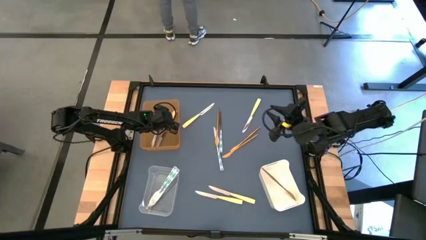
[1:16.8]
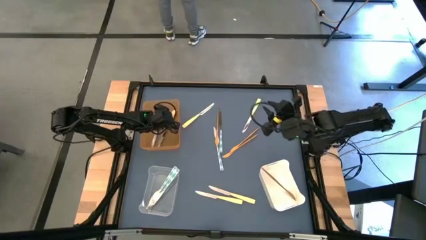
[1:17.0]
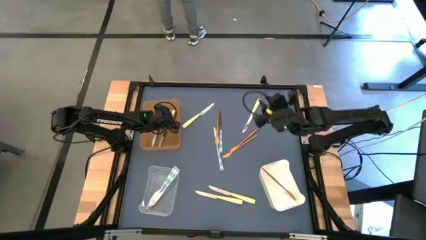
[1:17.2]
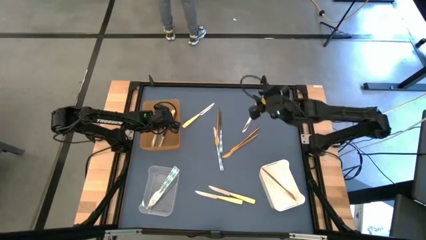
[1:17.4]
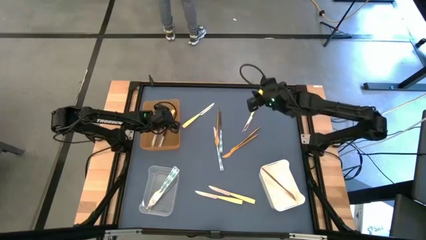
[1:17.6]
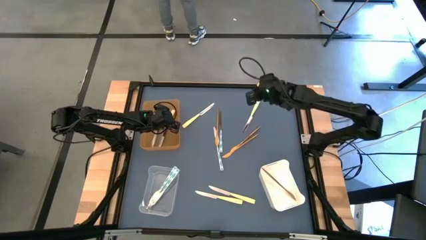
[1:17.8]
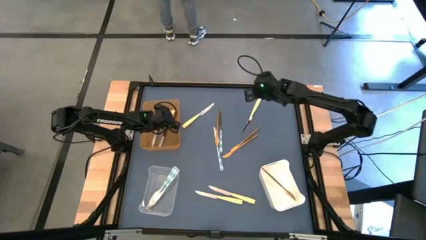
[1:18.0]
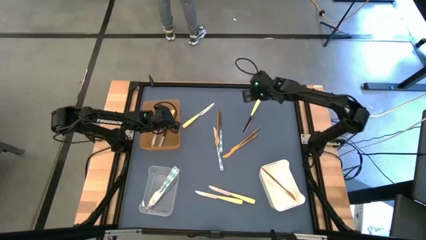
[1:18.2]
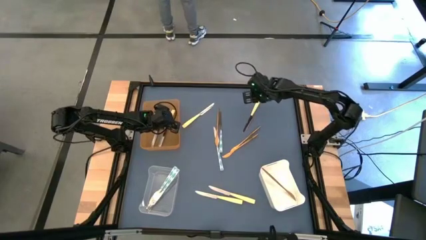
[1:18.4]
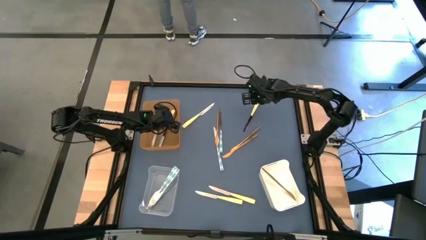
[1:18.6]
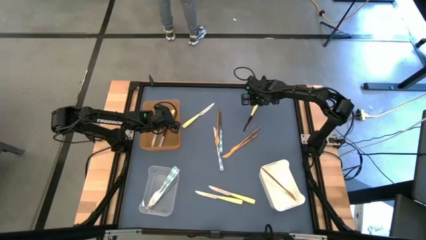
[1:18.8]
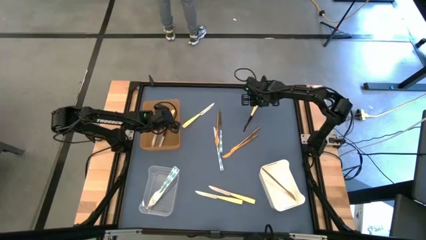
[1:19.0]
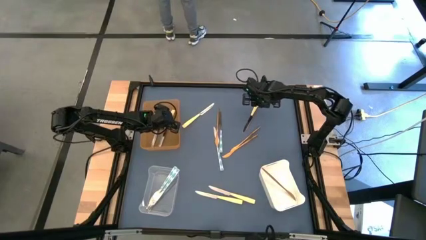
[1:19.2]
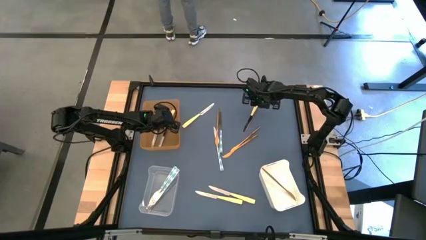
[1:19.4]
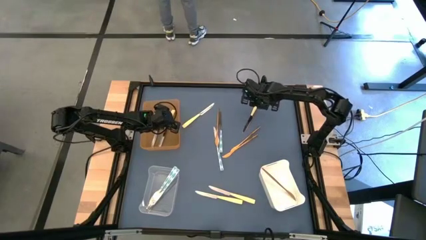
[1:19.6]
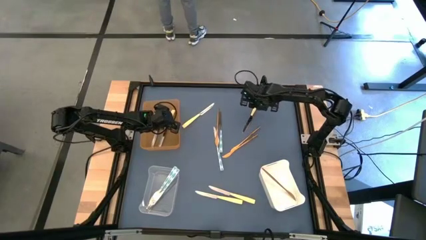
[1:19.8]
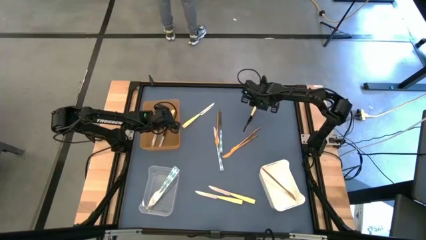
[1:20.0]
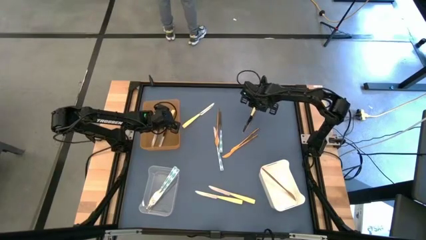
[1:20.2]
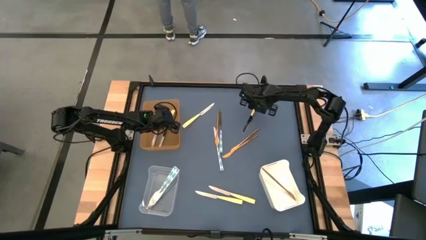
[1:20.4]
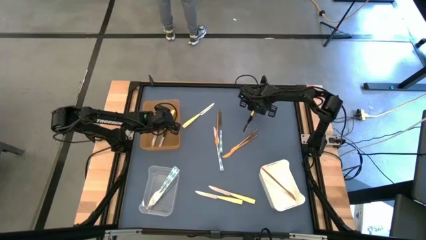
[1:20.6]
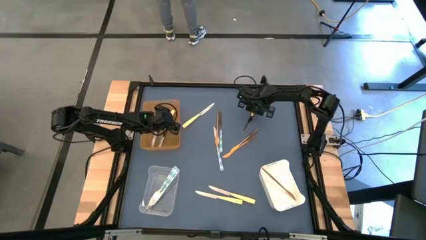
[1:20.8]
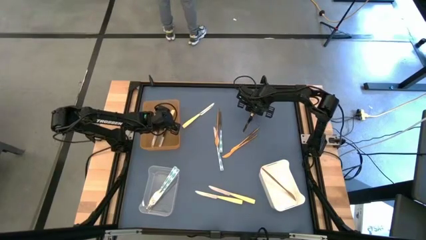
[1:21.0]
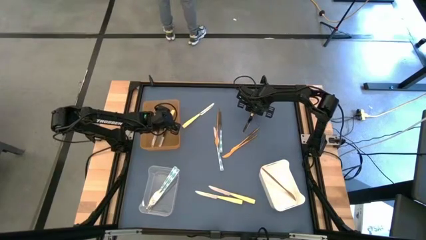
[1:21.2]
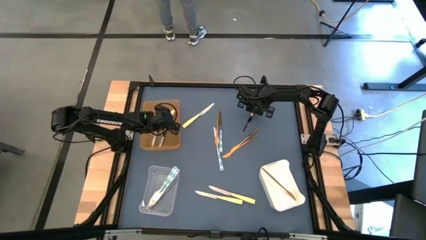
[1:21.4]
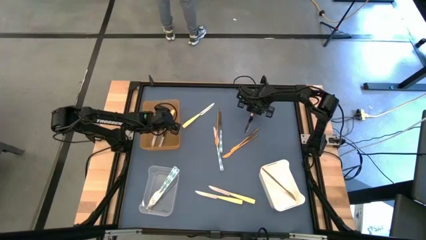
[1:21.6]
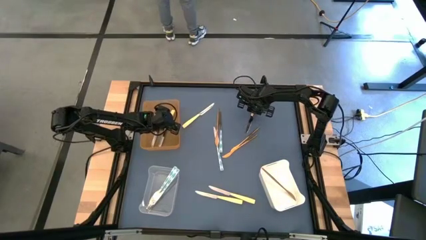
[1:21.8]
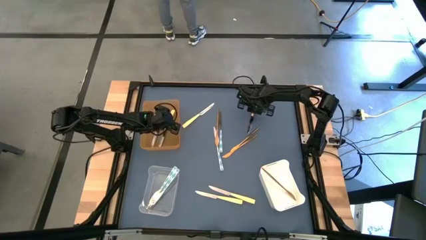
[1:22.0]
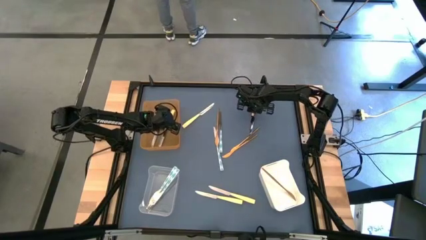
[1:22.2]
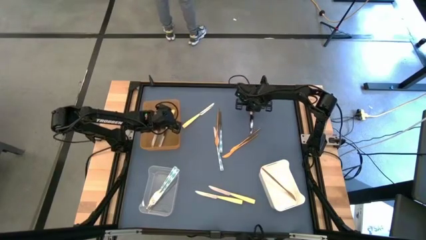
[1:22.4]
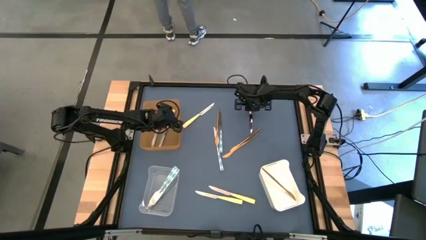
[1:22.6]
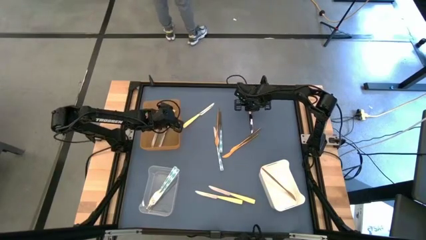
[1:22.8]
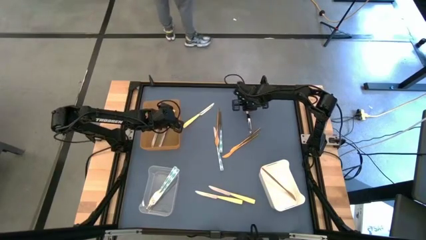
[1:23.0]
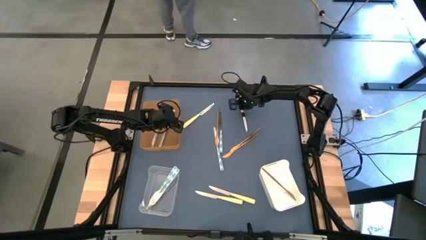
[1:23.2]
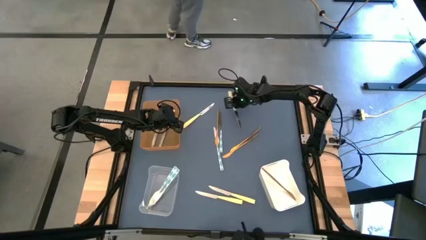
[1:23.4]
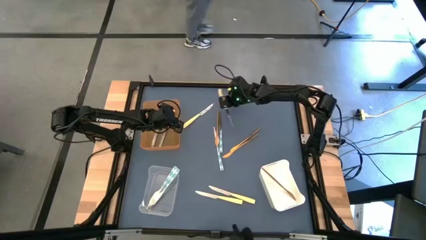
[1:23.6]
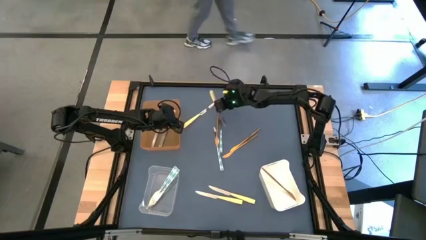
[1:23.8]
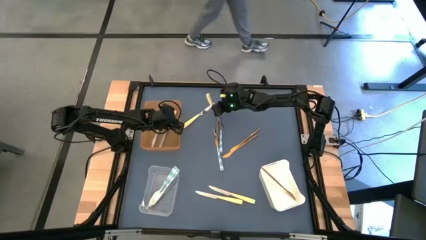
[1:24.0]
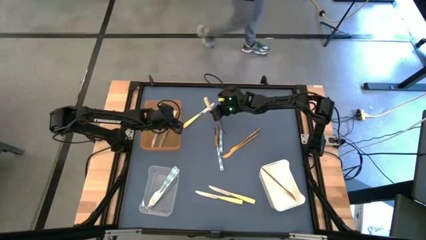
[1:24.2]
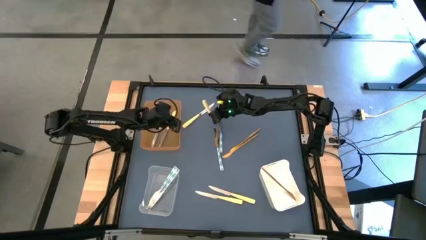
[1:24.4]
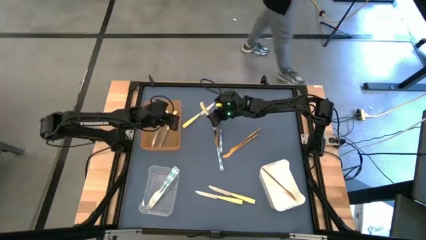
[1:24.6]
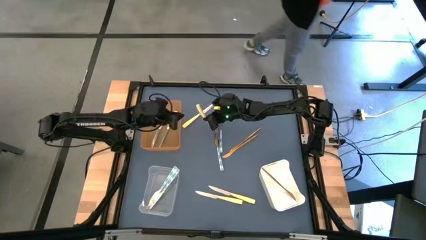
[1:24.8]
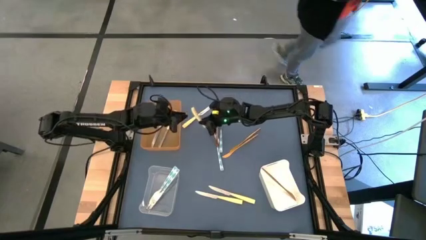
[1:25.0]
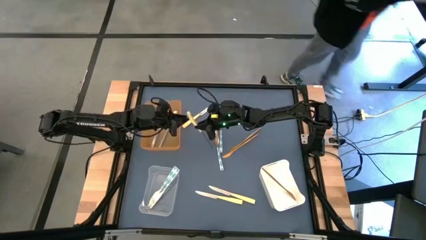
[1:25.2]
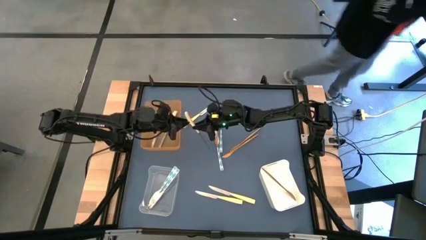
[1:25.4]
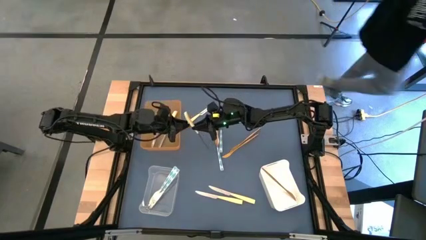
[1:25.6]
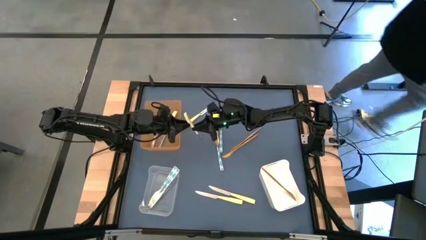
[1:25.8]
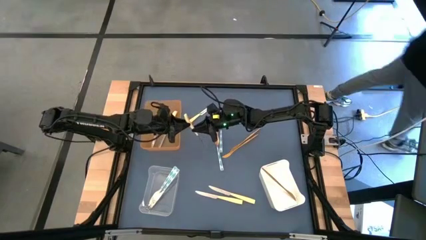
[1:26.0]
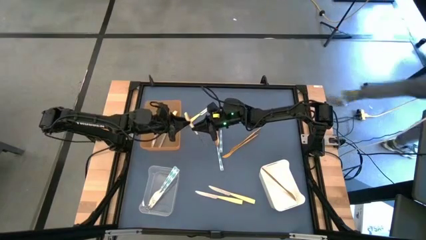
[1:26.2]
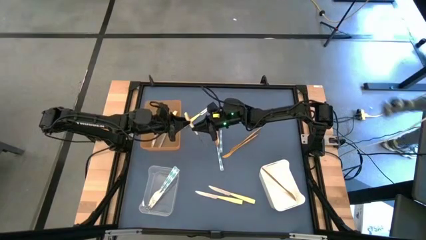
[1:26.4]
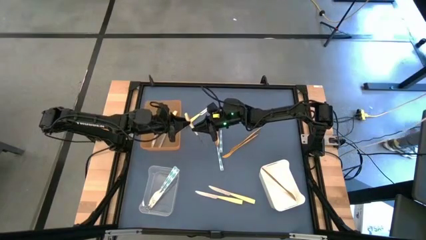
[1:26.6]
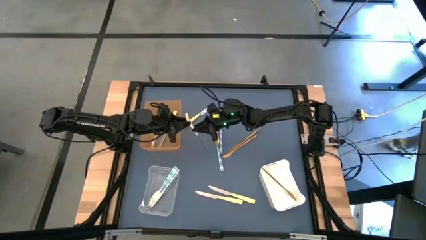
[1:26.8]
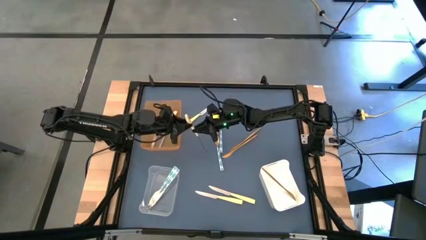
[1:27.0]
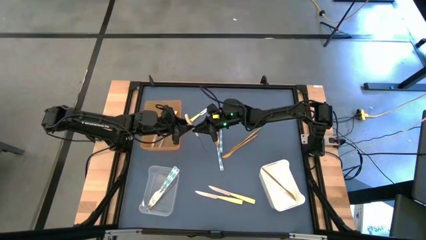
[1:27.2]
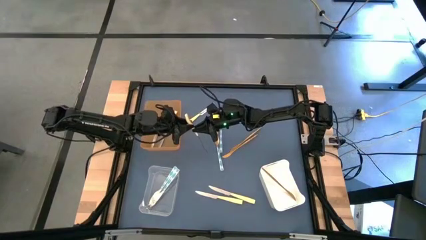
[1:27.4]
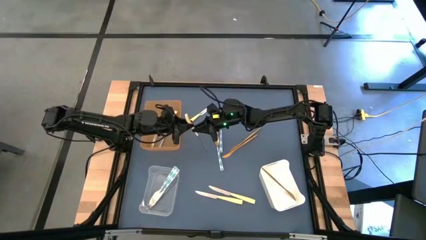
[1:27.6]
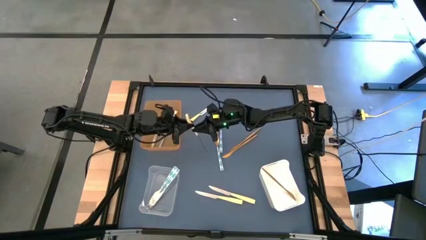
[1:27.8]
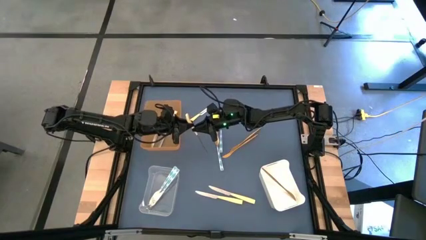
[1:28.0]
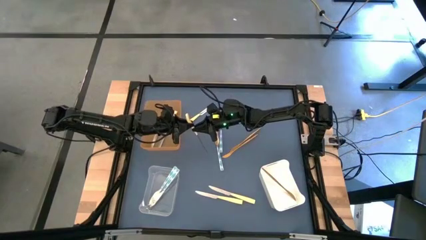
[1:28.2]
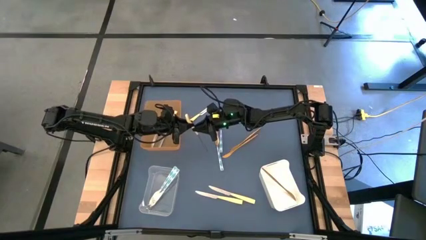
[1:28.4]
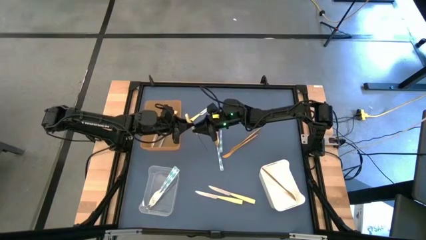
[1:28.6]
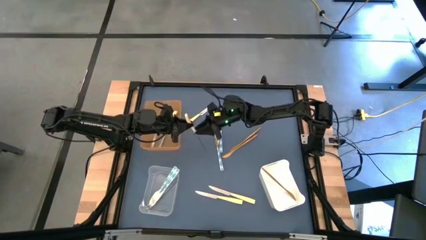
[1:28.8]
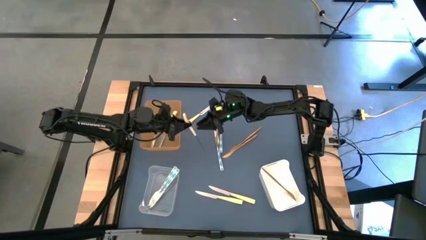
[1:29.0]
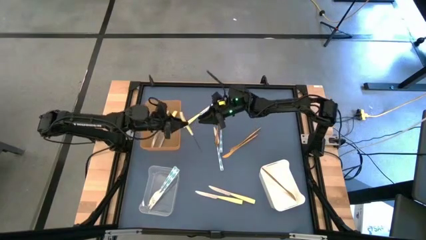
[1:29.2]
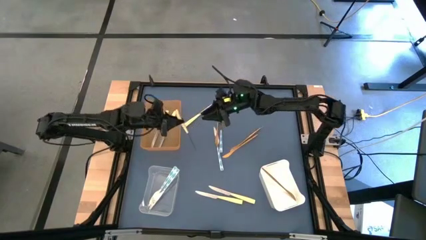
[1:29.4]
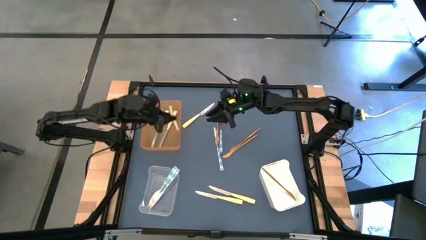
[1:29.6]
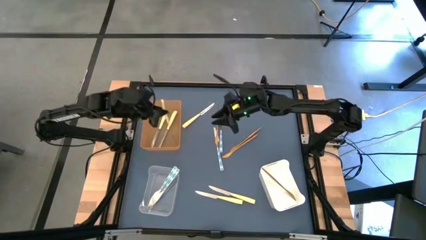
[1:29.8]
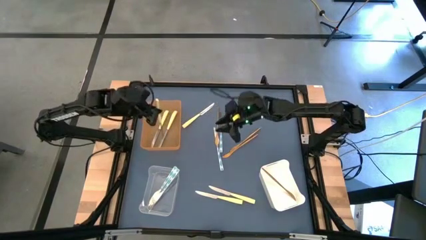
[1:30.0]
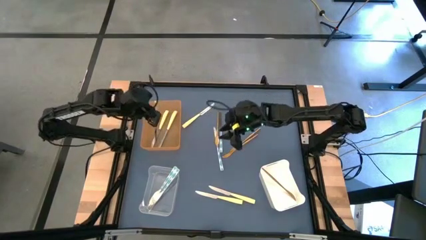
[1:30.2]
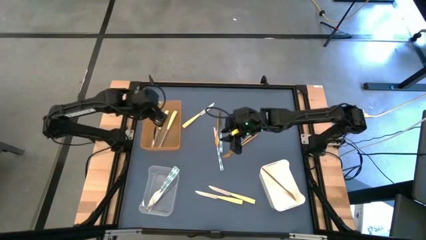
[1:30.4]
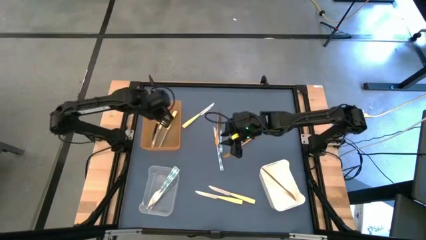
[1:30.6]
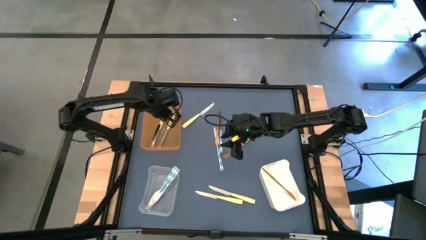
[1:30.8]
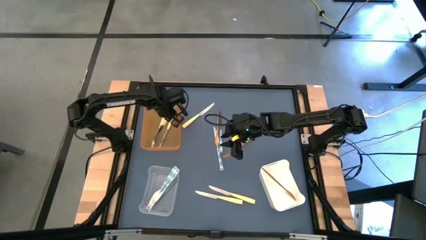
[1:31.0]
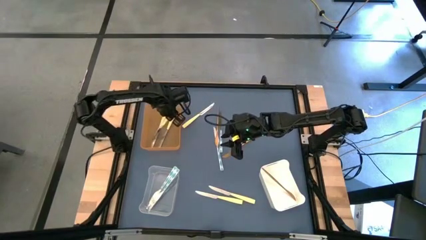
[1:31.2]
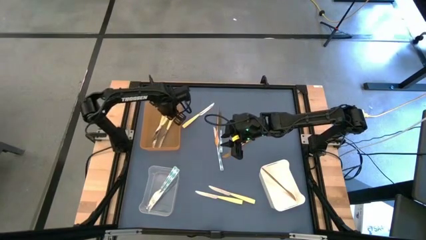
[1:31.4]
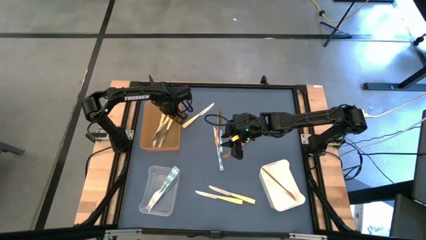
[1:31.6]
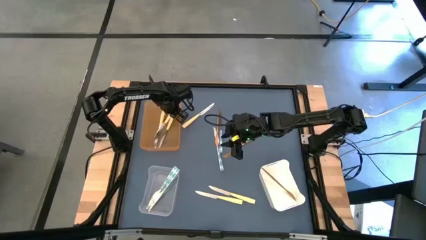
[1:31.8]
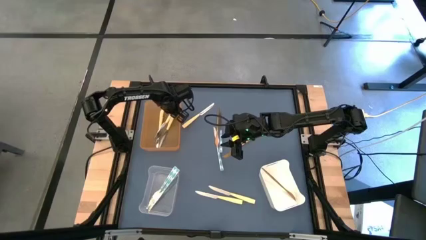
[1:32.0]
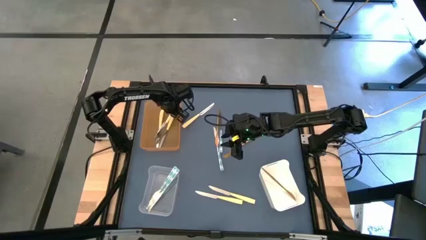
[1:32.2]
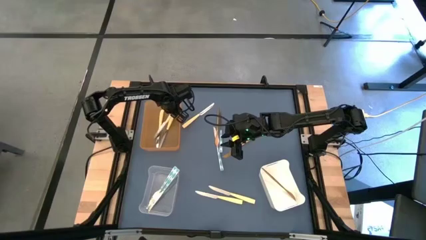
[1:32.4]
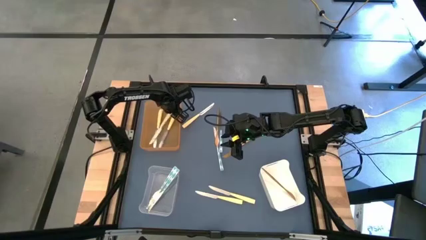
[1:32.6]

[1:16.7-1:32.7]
Task: Sort silverware by color (type)
Put the yellow knife into the orange bin
